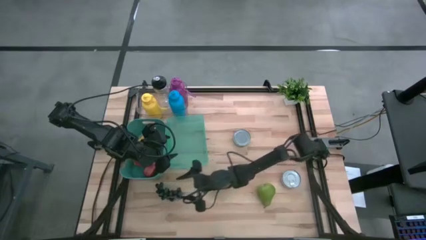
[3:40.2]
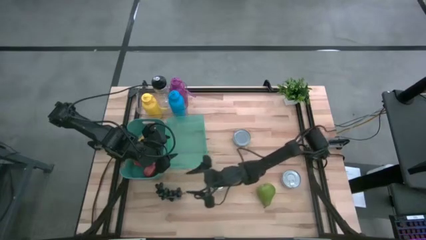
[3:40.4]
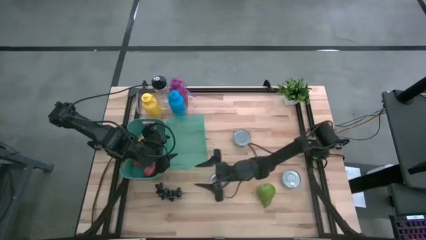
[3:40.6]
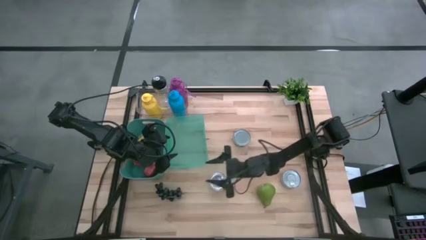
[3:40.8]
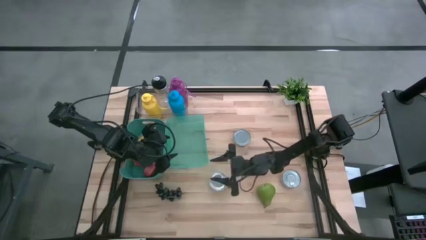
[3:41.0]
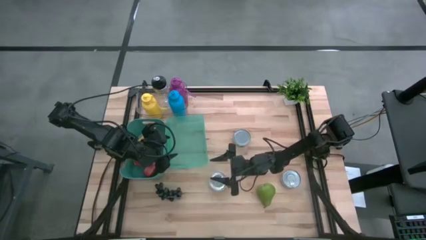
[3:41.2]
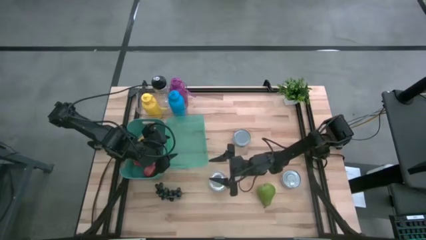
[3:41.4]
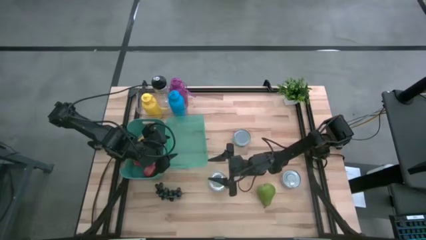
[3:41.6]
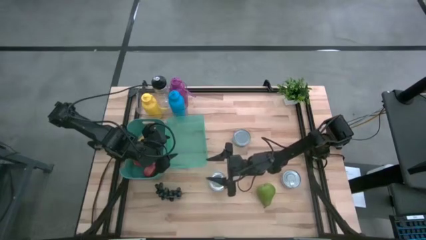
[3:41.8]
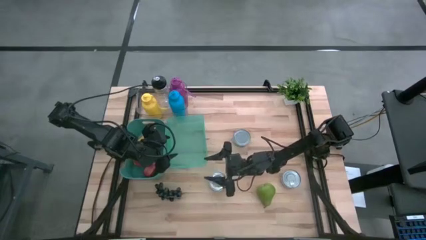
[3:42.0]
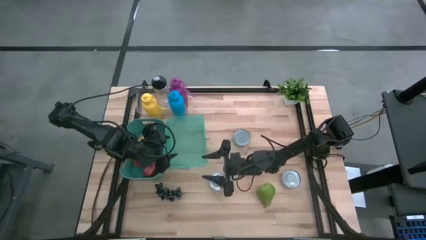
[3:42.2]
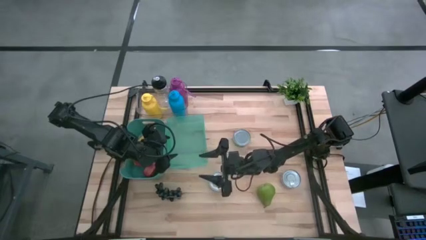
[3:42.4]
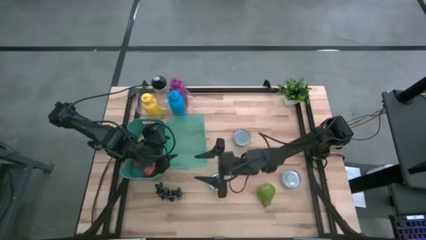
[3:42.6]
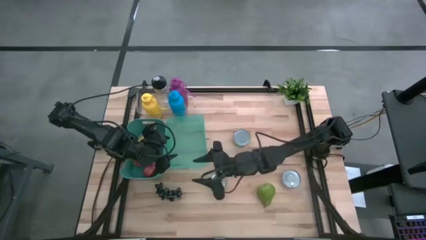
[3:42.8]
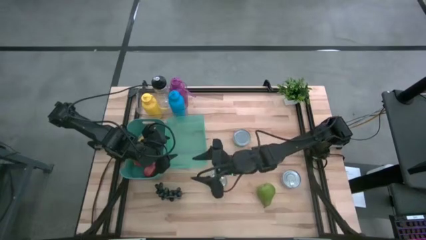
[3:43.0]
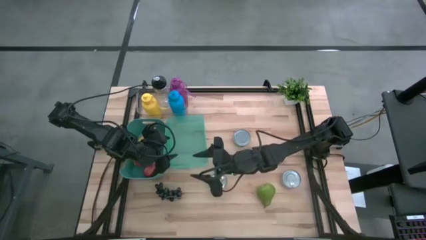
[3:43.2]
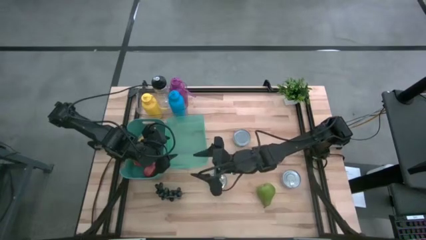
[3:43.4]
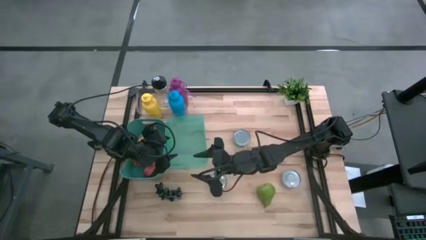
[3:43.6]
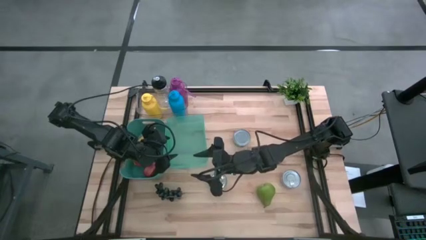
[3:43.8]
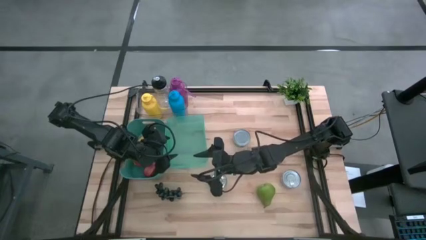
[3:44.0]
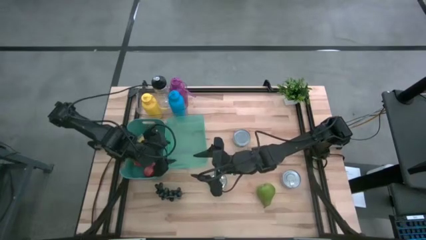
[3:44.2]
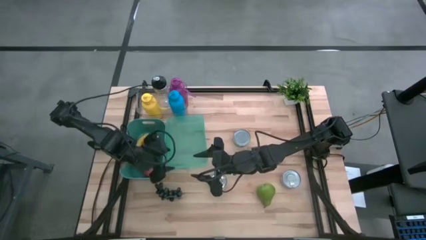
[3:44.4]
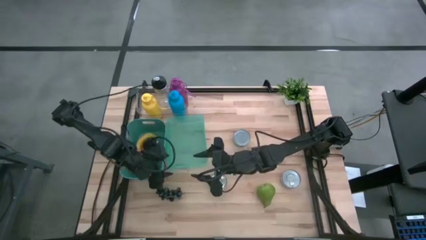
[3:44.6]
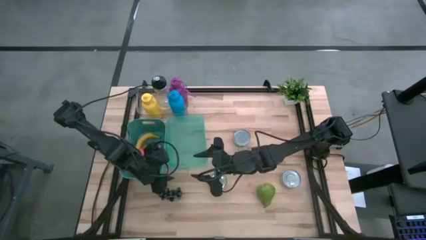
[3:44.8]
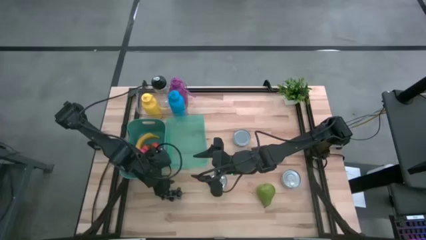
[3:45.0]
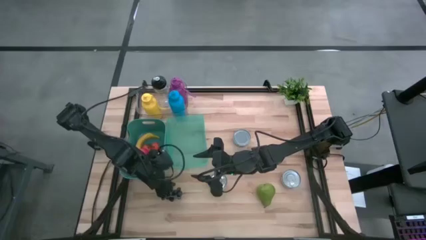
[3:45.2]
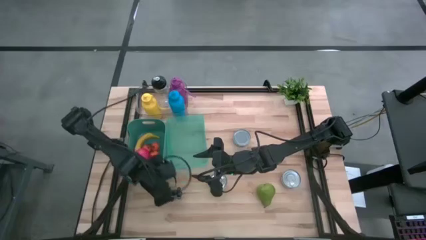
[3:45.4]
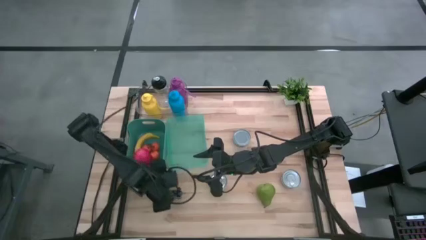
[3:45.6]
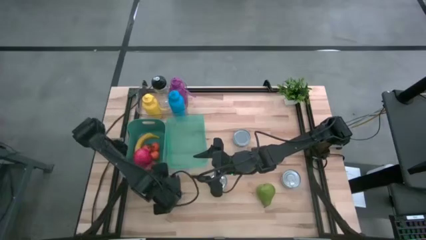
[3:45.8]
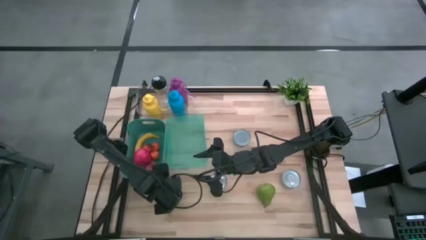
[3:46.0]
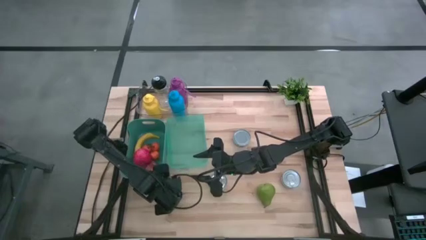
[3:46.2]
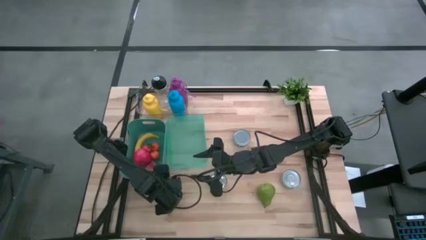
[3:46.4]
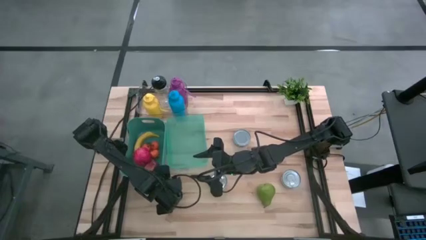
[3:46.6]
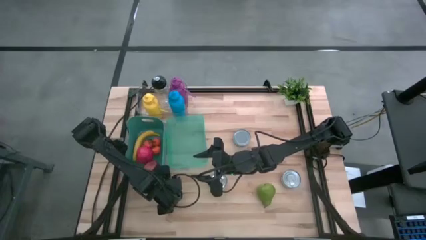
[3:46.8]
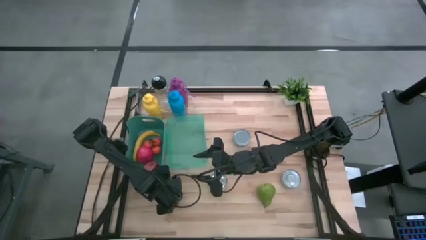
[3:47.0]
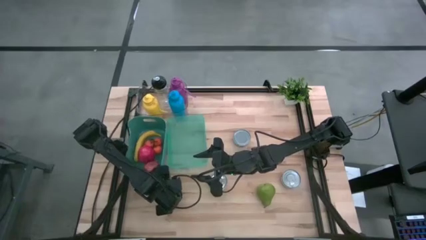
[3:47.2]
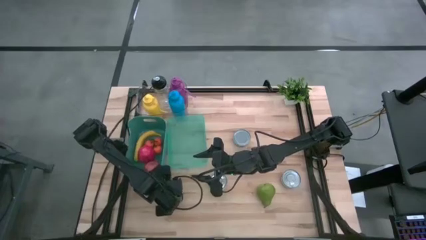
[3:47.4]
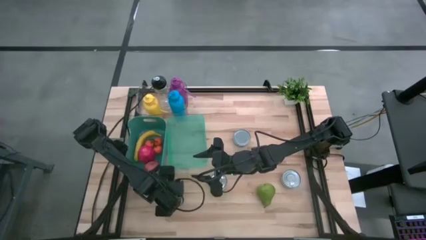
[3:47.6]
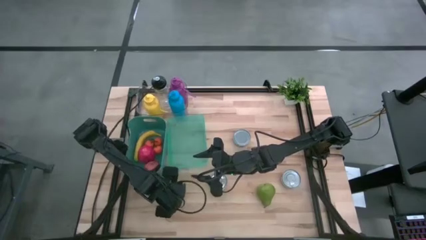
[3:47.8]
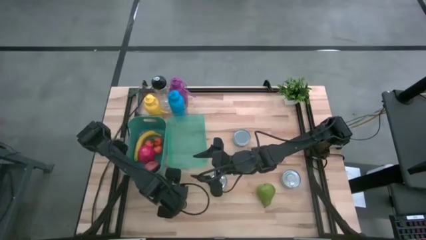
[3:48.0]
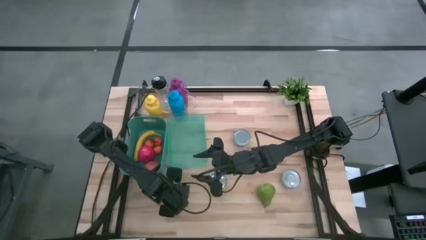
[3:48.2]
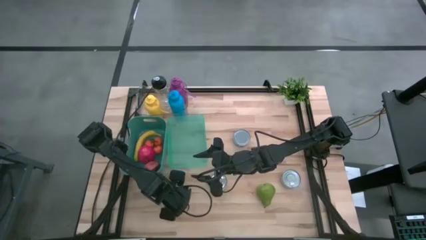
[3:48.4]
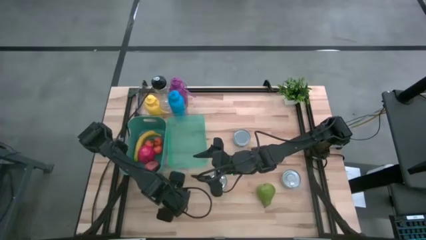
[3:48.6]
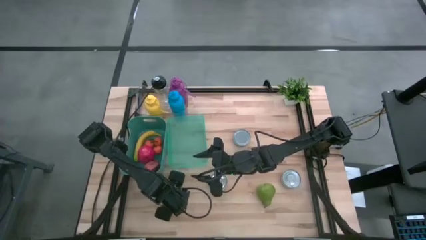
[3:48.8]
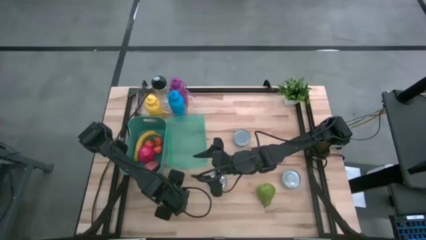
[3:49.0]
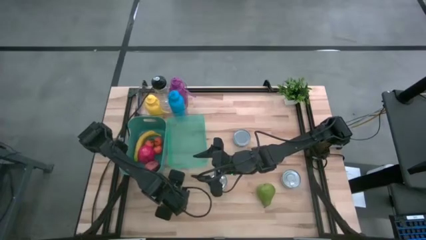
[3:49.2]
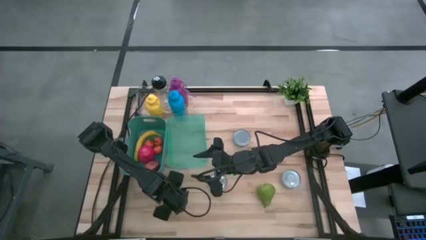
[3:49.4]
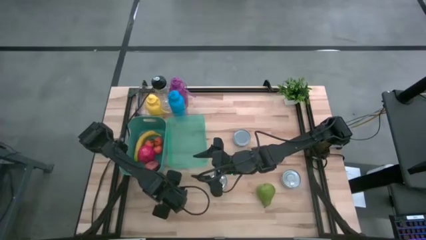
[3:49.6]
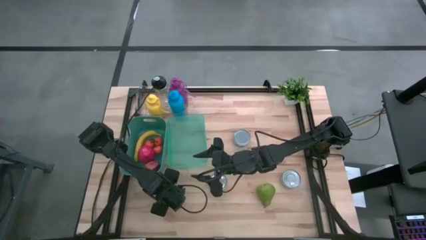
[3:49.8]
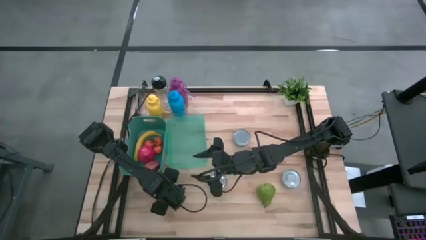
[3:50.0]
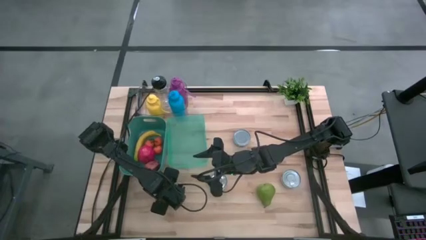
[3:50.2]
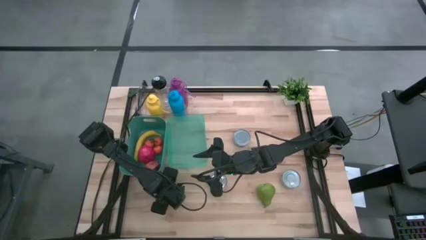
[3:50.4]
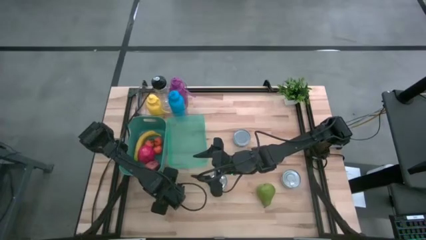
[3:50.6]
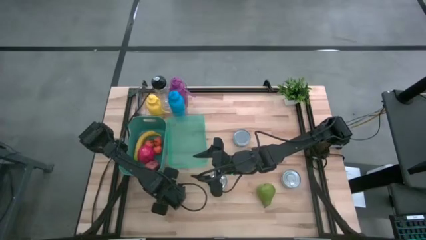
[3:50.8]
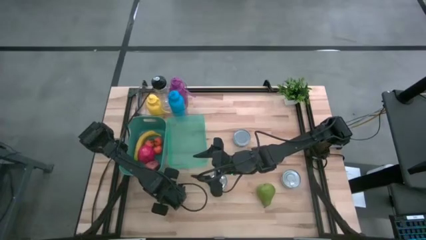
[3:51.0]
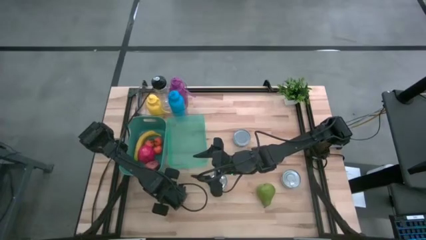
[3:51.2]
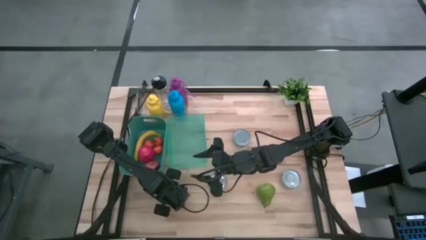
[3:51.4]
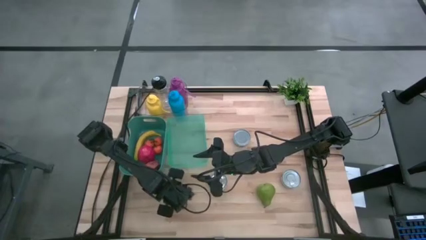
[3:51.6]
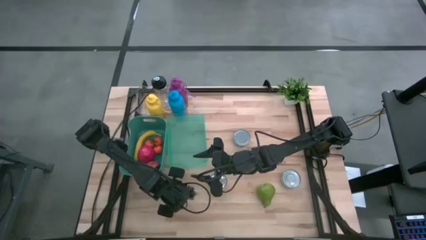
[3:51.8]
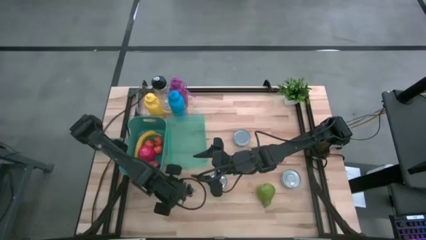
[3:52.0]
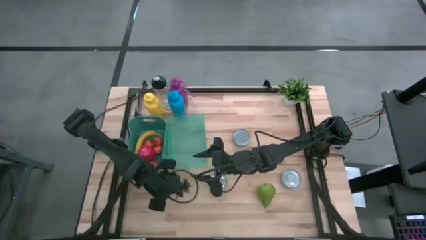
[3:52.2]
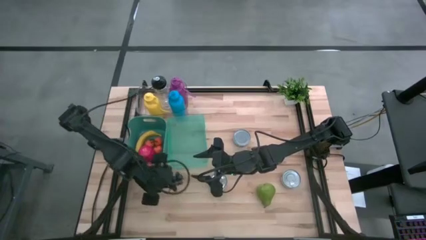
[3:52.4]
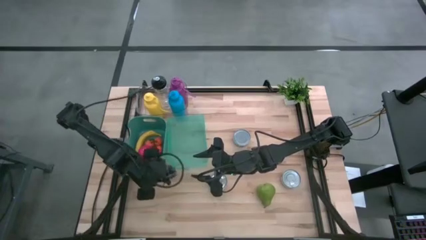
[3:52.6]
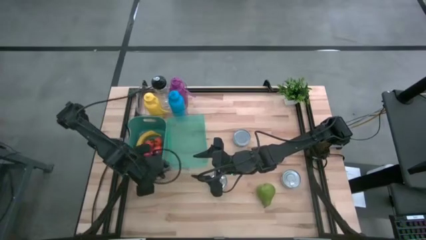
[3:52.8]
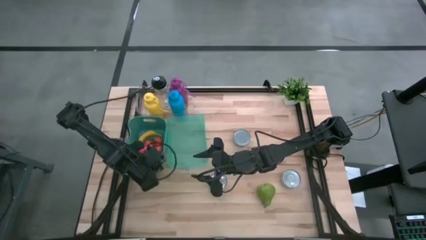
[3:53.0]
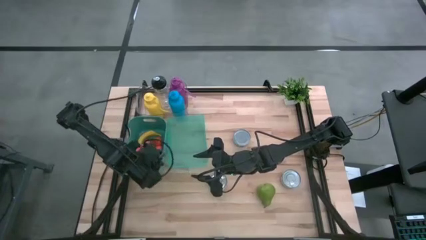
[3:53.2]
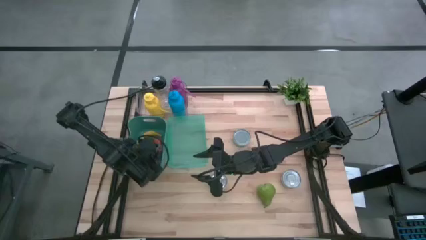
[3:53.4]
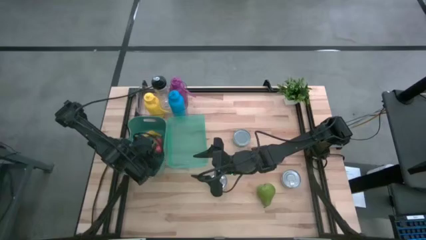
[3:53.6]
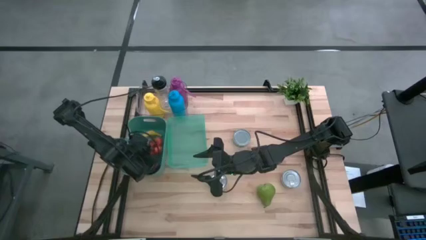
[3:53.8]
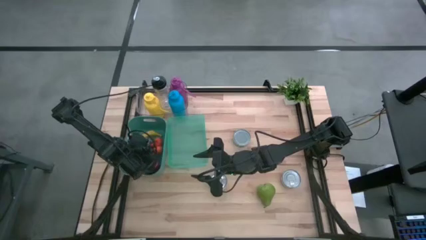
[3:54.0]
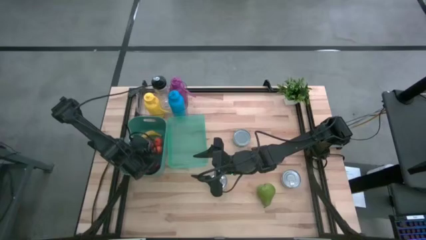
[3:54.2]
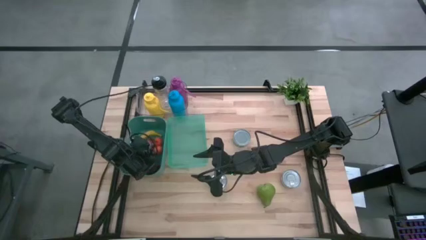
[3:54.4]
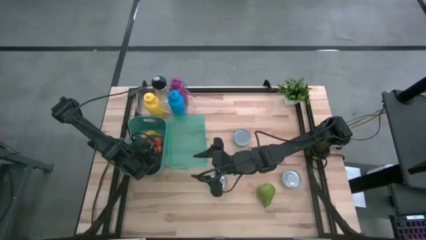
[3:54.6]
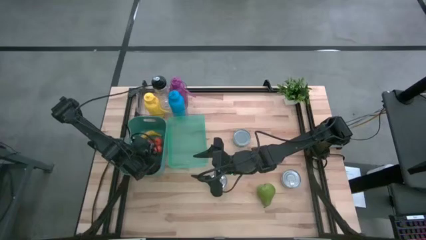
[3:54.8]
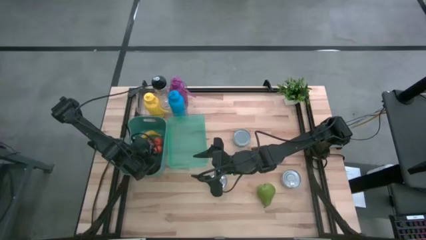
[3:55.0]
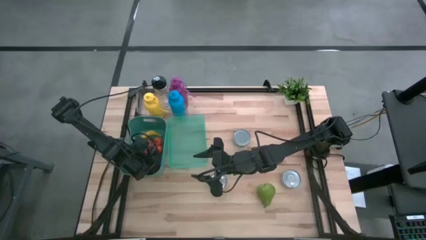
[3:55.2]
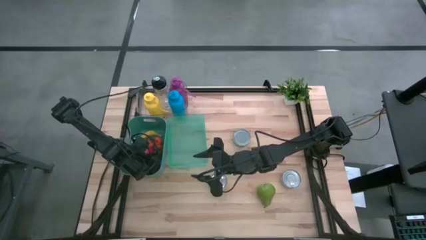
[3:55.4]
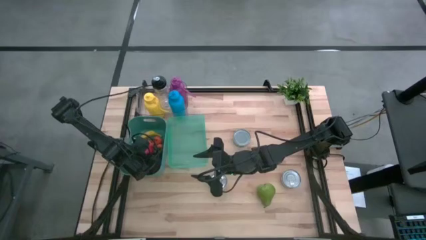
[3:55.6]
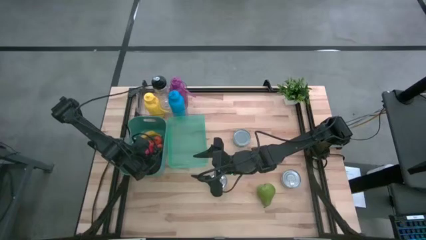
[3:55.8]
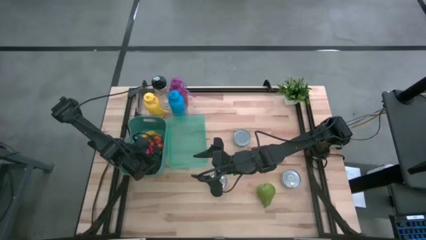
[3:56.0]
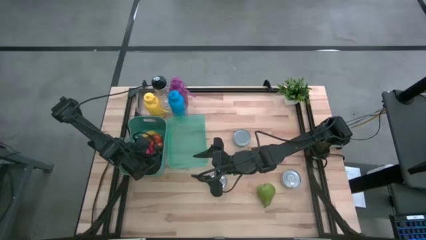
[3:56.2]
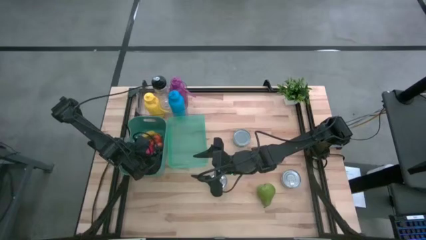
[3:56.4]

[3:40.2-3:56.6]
Task: Pick & Place Food Item
Put the grapes into the green bin
